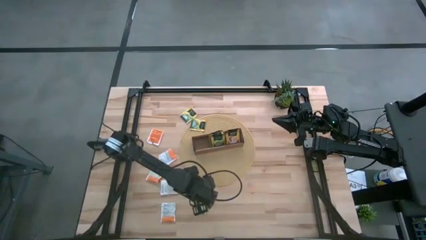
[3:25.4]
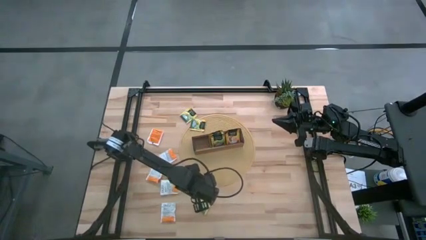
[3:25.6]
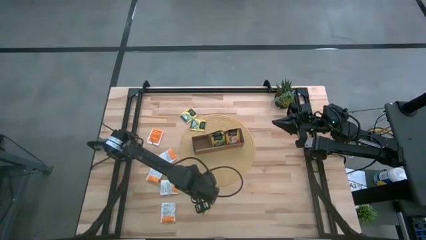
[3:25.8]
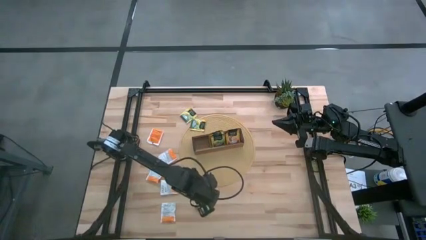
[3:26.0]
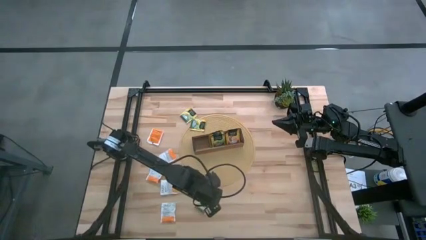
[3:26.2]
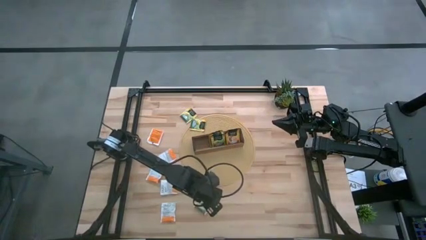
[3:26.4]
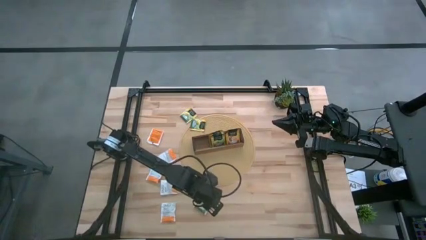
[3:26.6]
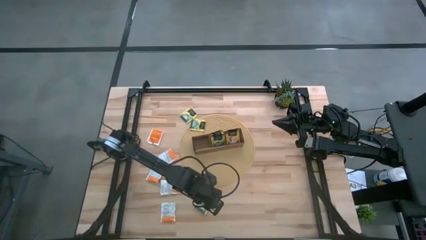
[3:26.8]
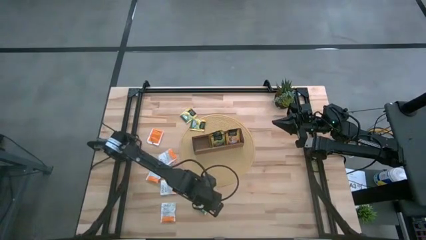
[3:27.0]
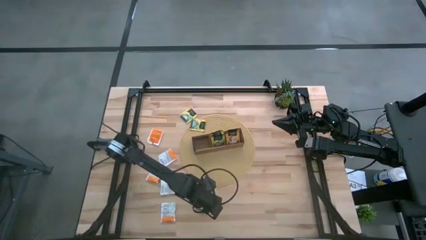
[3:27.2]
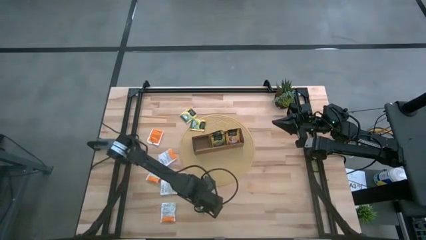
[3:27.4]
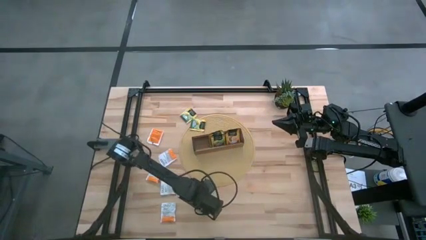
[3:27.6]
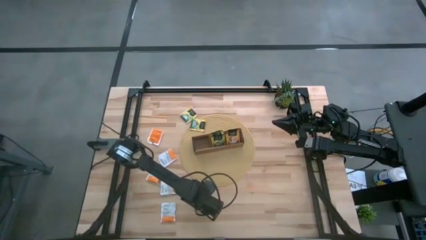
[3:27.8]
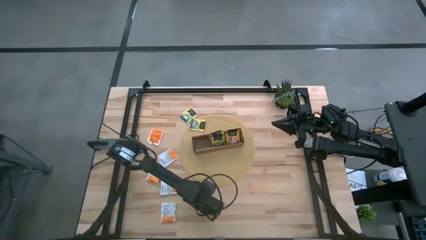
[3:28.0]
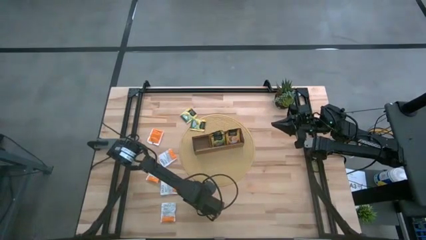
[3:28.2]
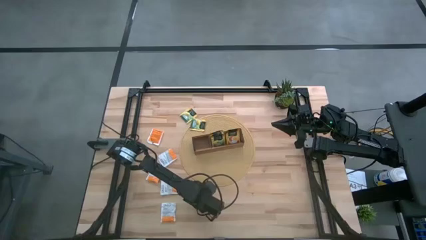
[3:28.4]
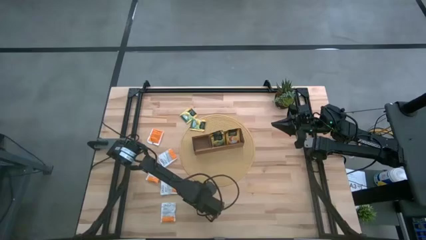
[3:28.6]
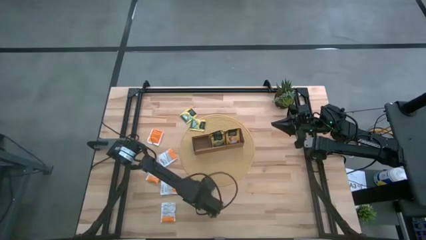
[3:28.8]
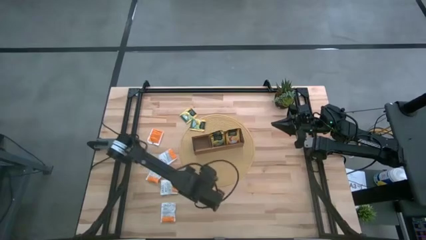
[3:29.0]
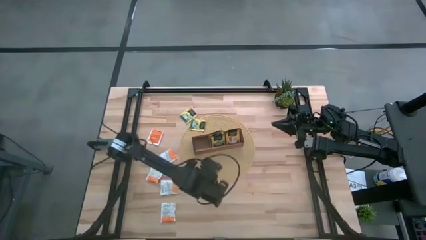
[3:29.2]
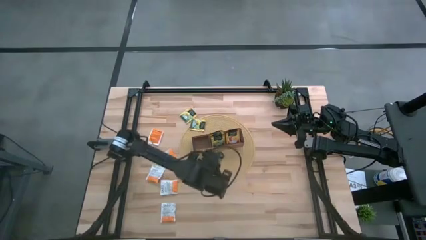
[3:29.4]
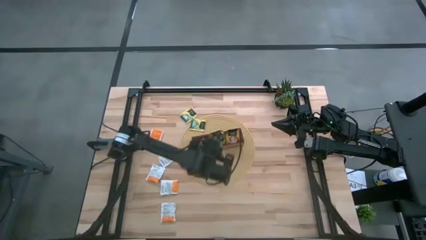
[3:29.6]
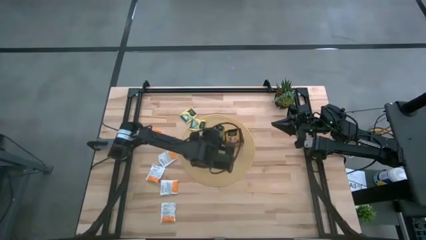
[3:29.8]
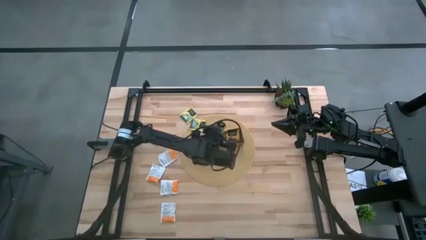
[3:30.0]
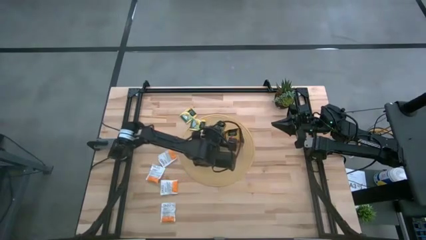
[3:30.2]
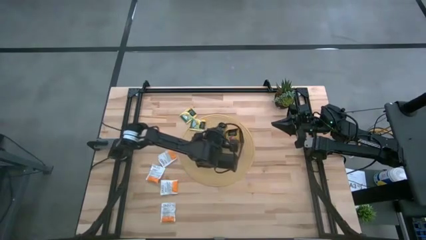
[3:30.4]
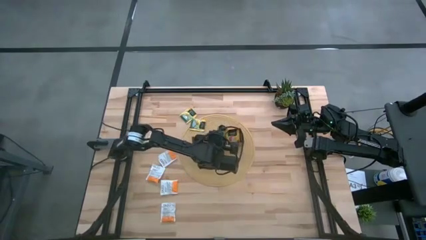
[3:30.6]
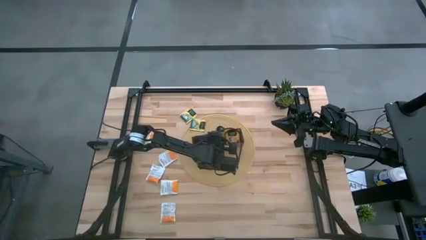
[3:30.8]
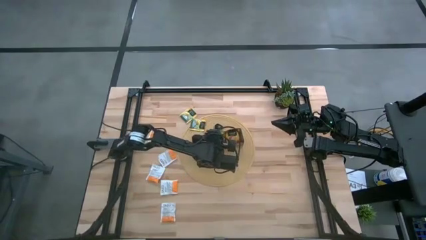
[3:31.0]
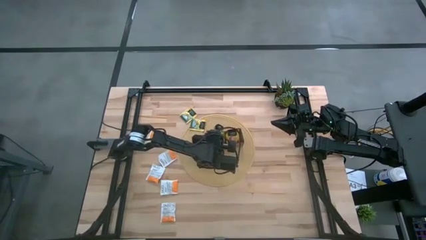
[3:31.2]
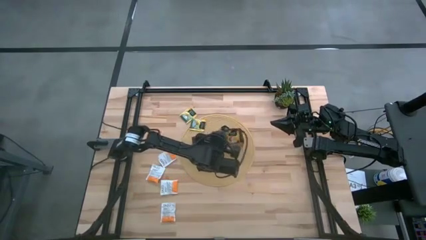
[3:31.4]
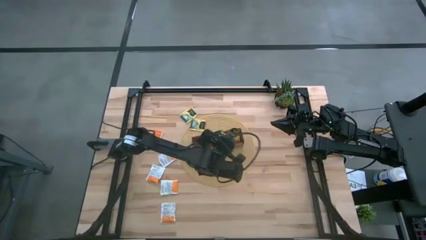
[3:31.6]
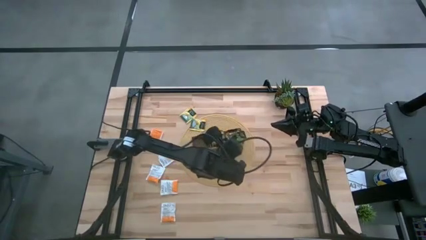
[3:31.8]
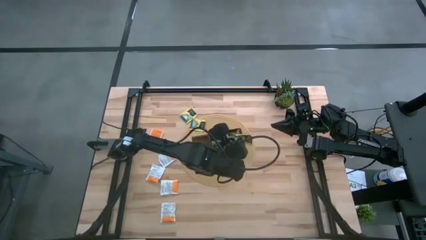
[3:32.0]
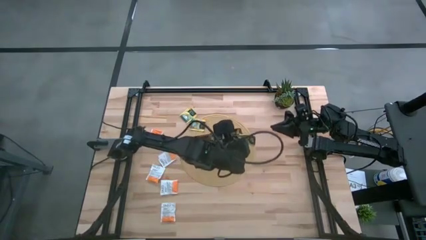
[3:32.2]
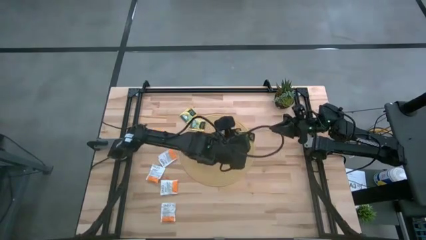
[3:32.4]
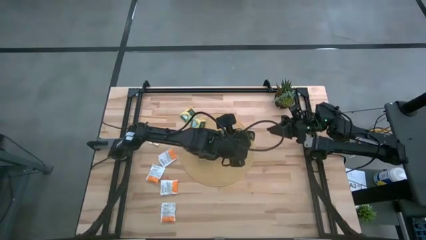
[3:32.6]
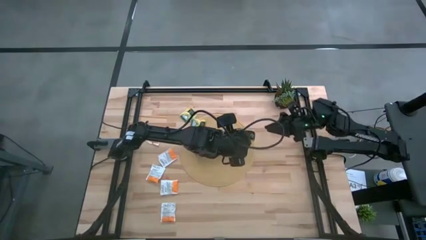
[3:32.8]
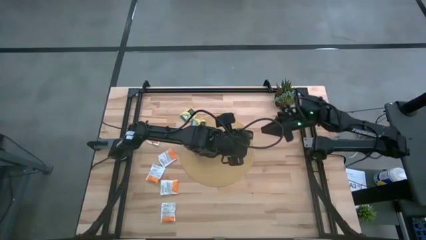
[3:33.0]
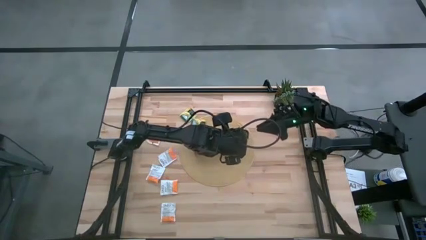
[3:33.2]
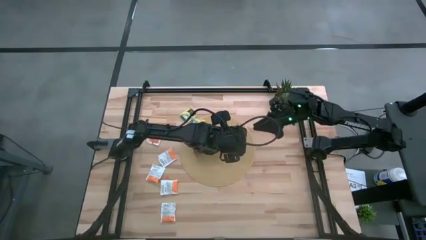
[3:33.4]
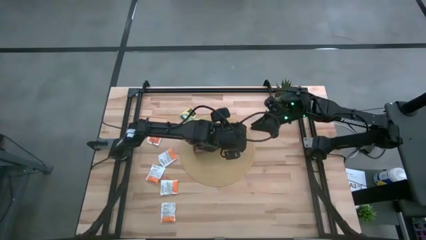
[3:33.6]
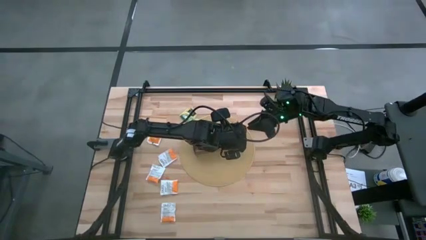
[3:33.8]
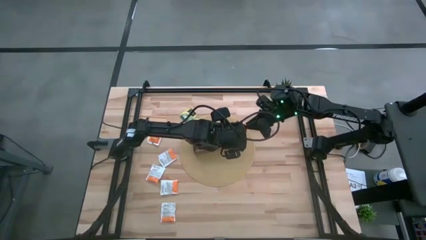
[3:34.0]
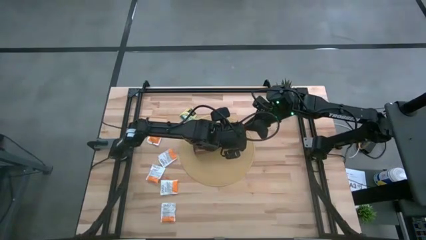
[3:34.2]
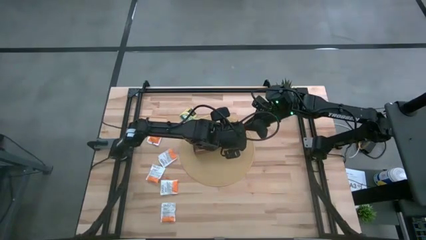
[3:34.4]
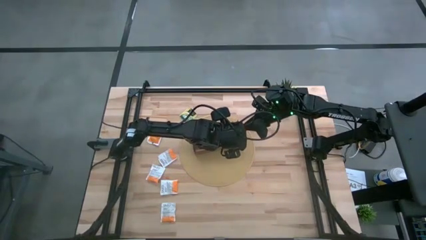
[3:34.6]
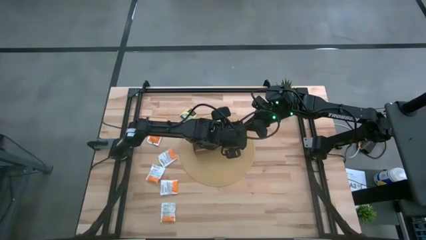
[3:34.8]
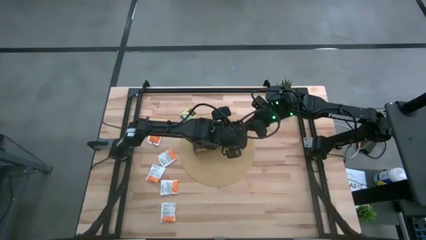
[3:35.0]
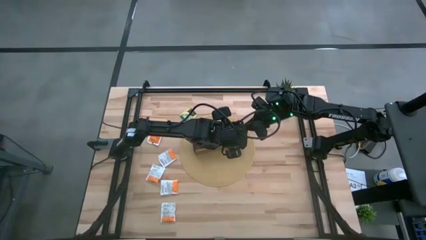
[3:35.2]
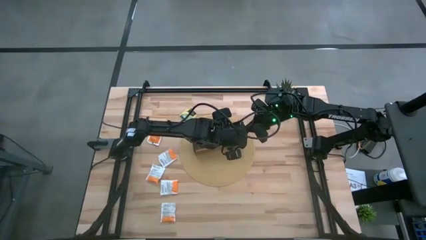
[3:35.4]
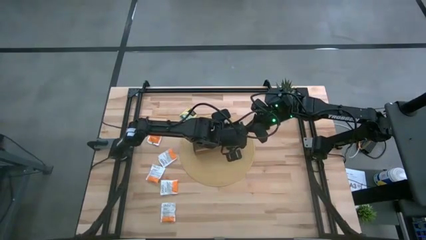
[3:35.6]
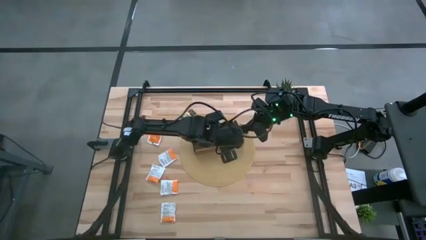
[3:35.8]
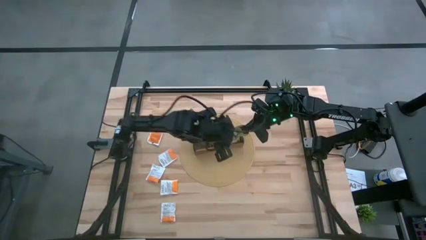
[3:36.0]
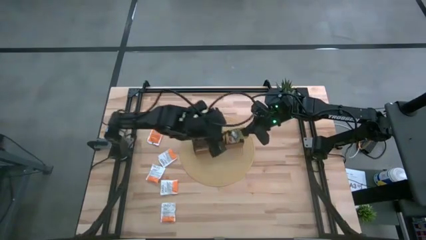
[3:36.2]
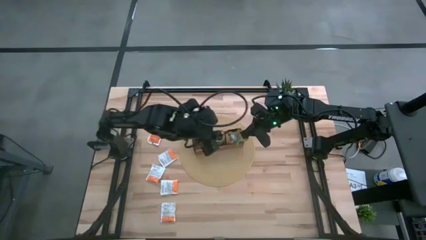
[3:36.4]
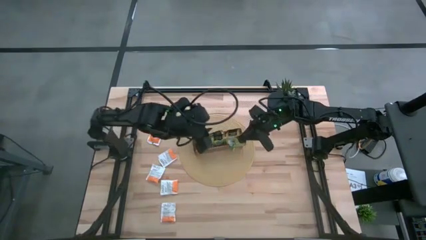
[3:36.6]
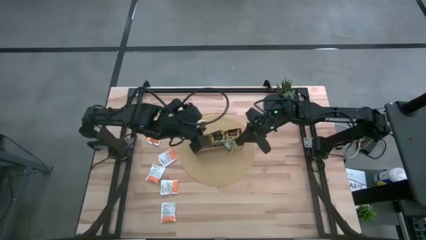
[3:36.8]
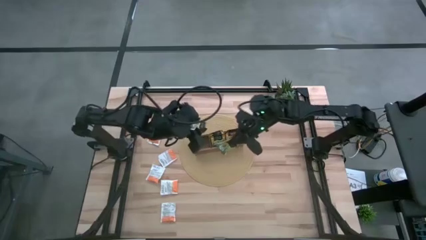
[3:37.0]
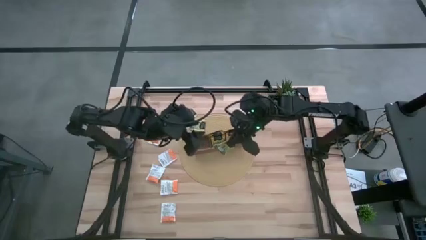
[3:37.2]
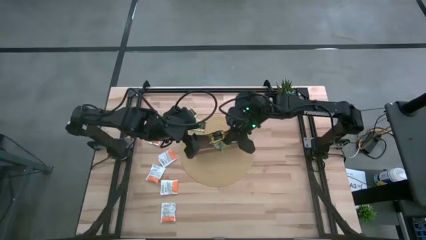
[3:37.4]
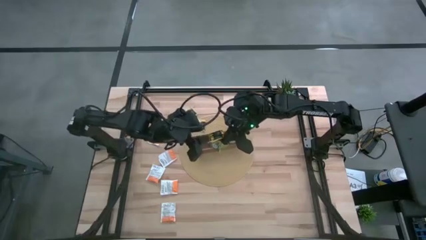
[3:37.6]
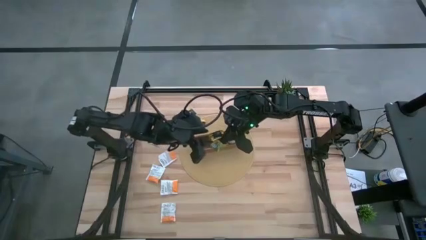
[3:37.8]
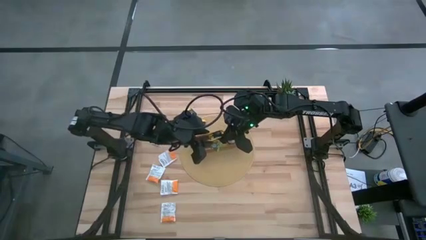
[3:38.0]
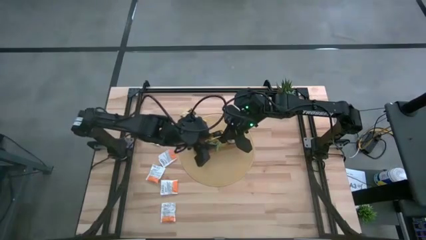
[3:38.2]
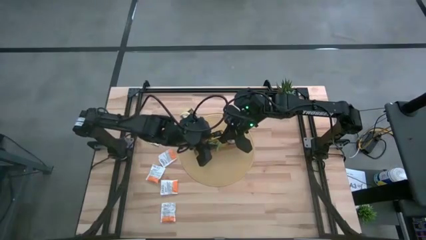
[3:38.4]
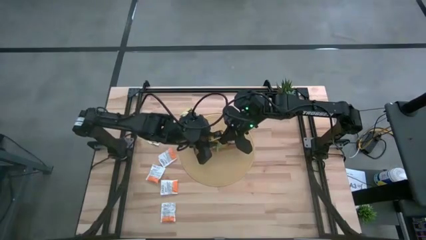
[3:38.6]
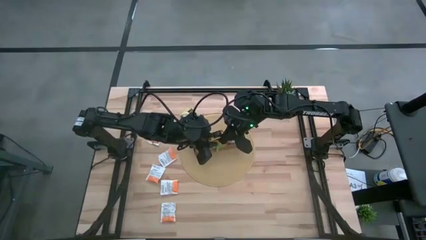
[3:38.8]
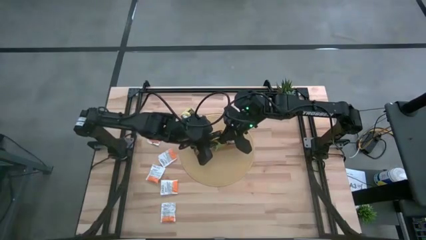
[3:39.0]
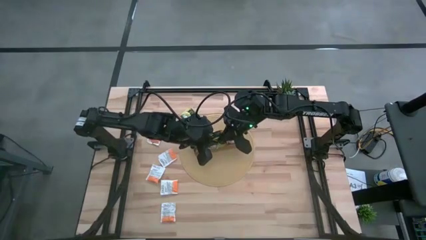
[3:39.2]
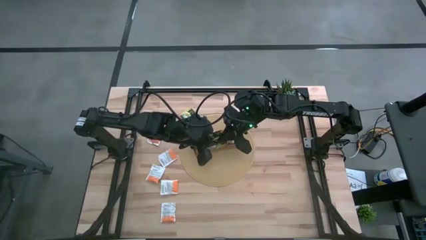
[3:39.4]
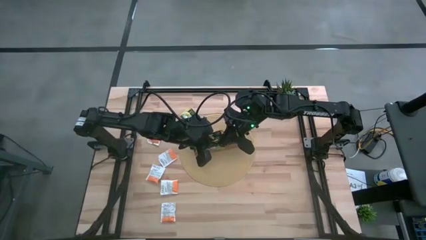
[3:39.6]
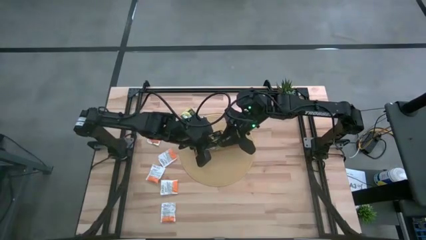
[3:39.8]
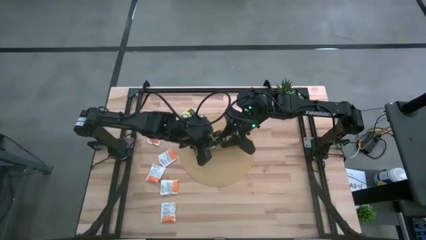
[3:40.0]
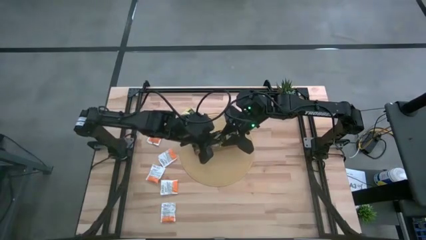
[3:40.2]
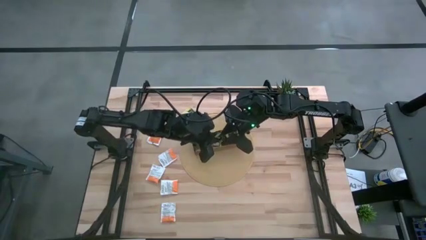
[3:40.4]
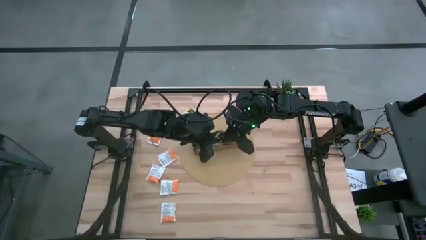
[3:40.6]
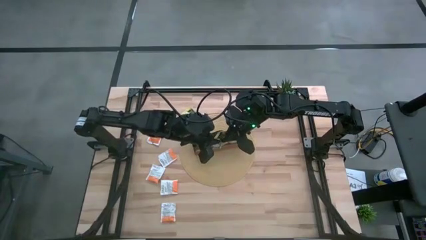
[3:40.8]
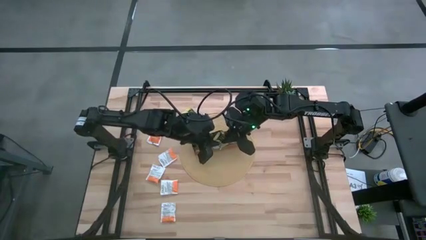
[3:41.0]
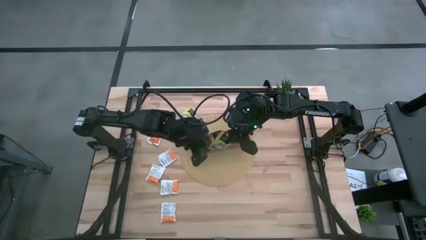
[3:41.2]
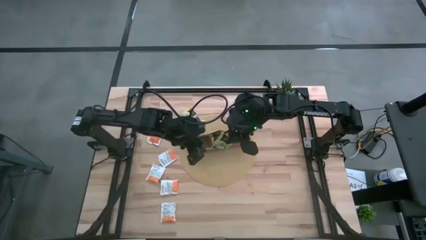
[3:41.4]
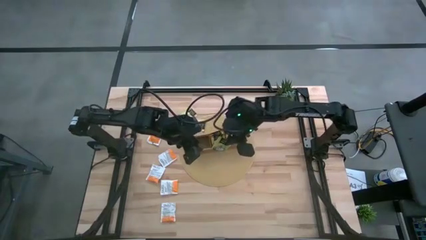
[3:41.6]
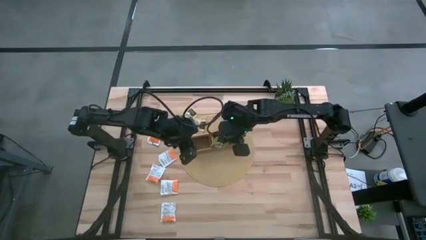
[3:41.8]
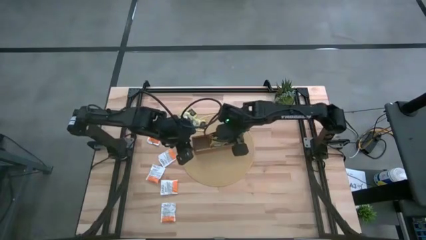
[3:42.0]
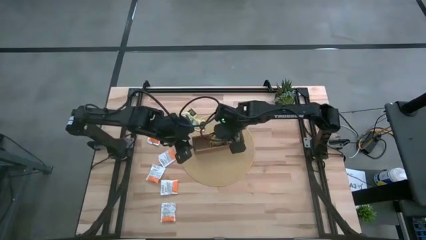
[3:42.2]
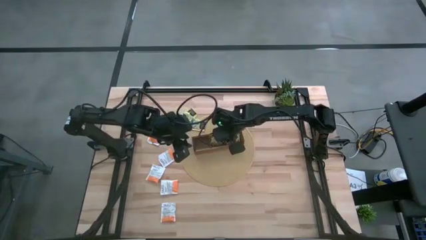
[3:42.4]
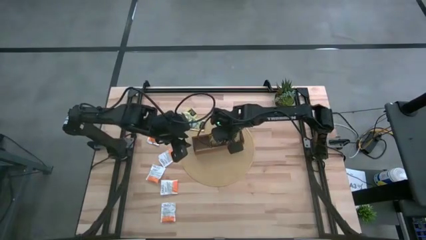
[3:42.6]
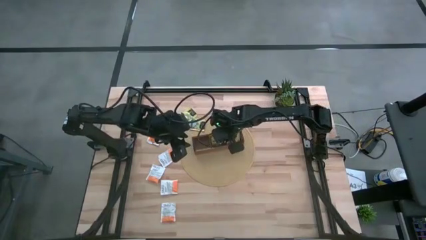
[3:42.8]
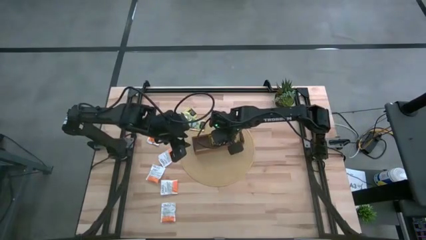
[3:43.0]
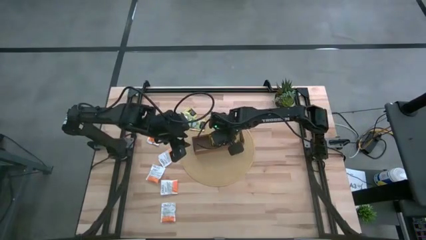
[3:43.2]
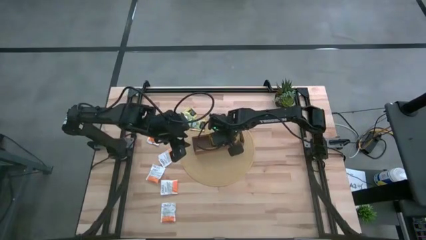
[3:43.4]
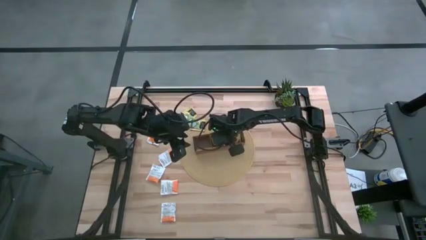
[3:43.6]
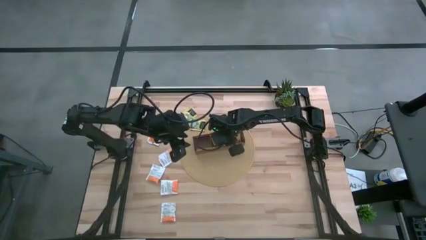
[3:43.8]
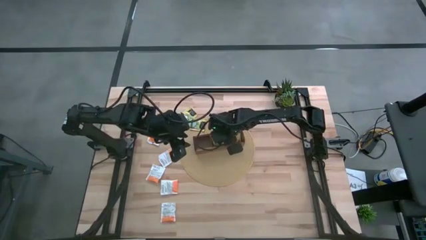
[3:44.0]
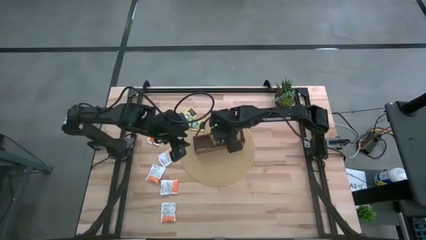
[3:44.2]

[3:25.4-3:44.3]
Task: Pick & Place Tea
Put the yellow tea bag into the middle section of the wooden organizer
